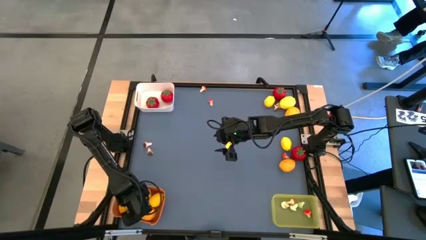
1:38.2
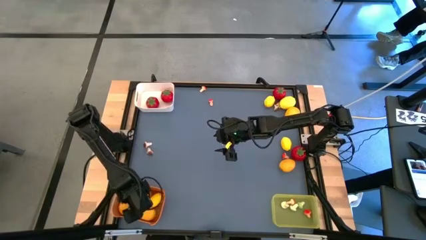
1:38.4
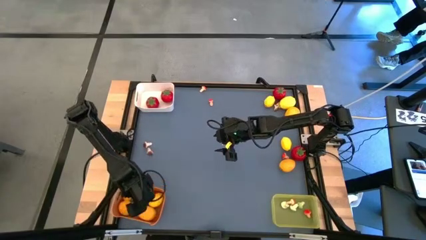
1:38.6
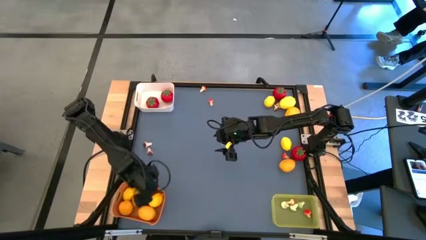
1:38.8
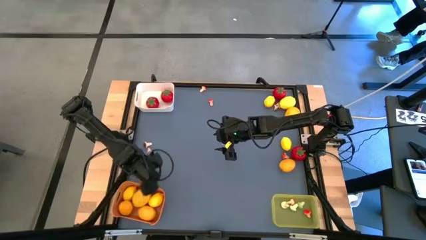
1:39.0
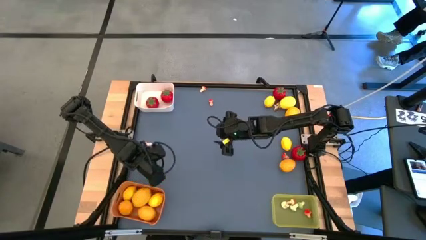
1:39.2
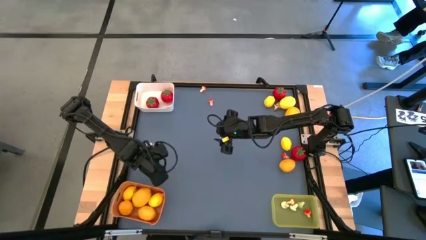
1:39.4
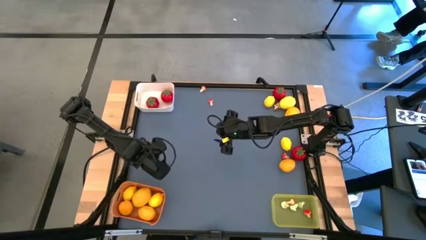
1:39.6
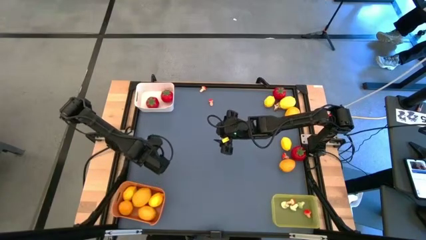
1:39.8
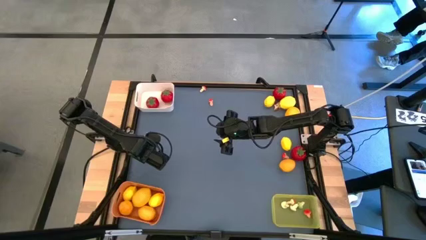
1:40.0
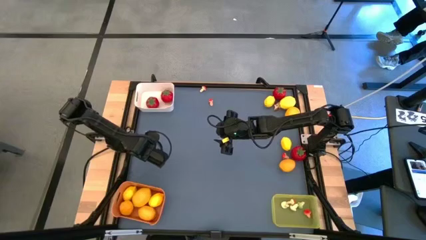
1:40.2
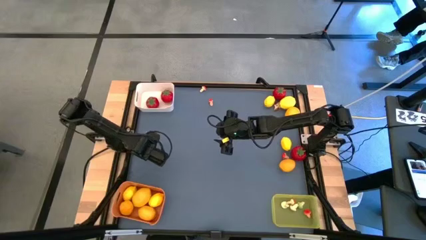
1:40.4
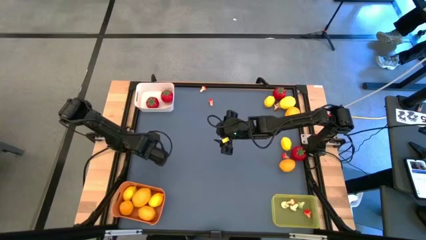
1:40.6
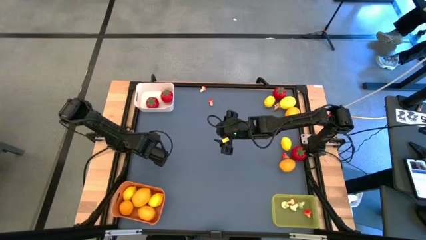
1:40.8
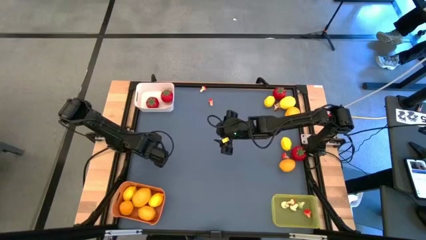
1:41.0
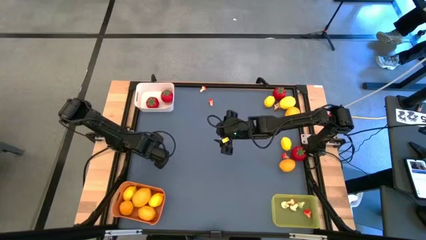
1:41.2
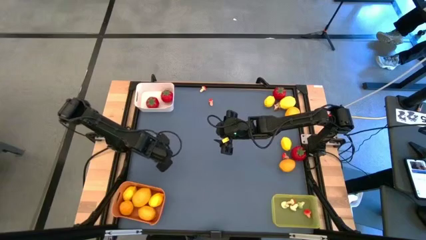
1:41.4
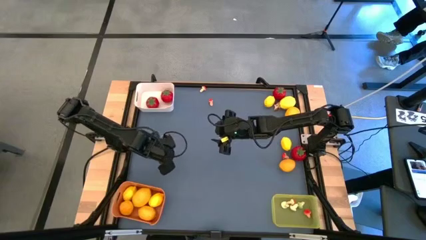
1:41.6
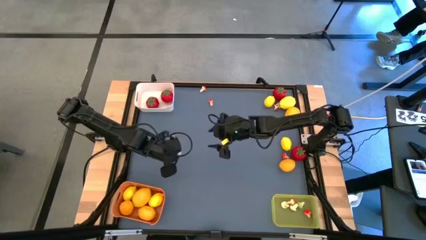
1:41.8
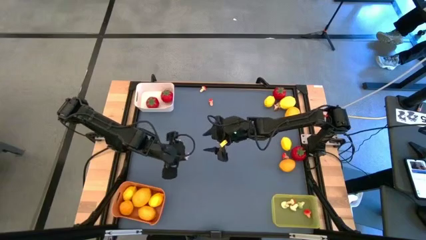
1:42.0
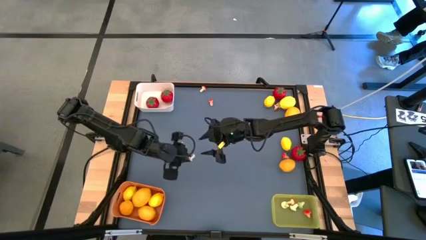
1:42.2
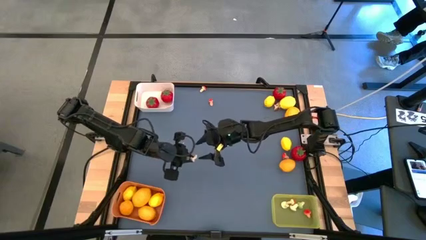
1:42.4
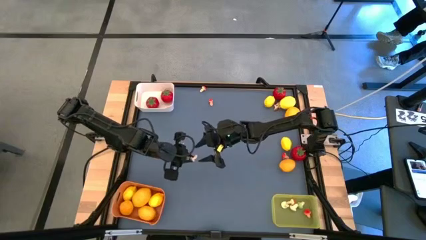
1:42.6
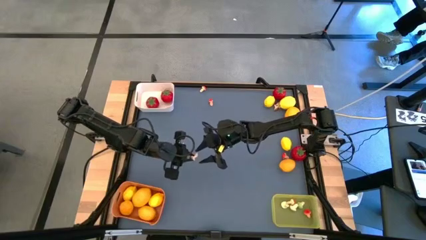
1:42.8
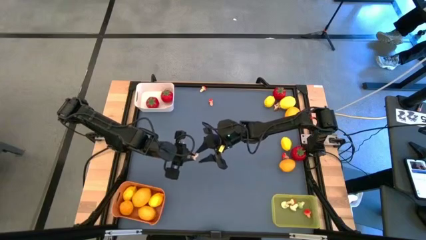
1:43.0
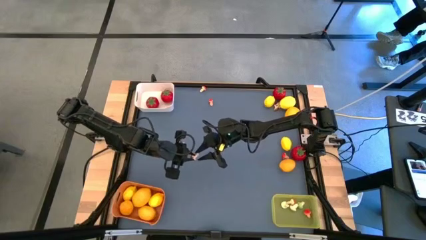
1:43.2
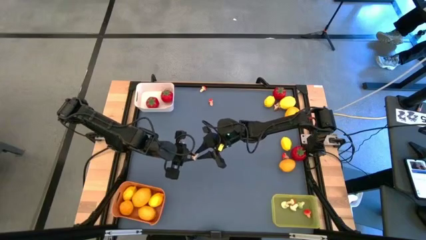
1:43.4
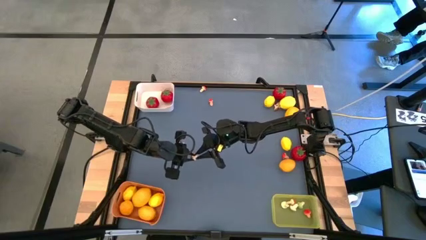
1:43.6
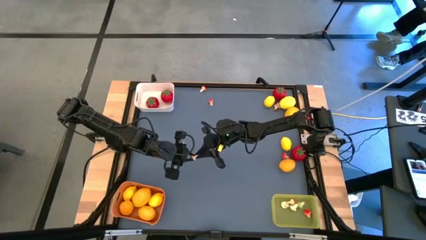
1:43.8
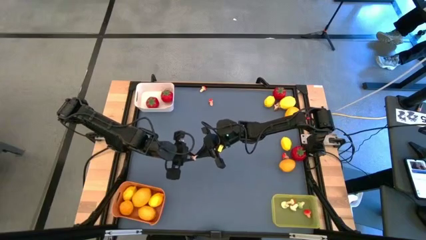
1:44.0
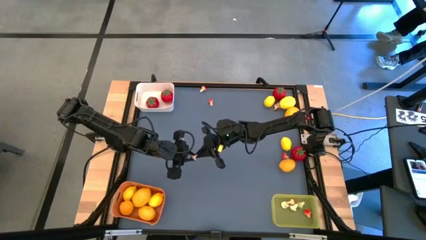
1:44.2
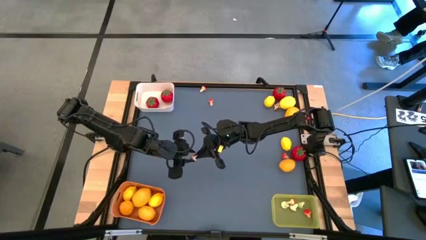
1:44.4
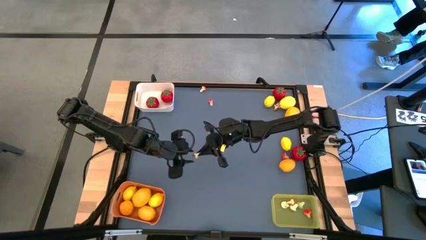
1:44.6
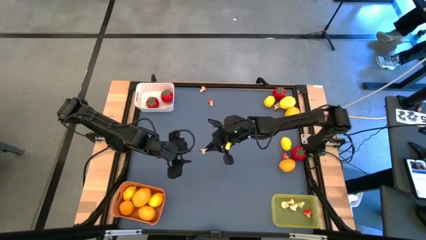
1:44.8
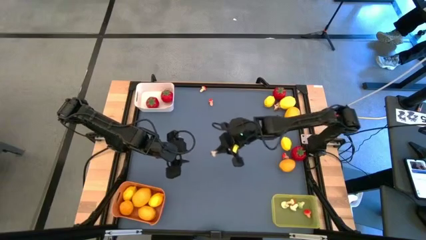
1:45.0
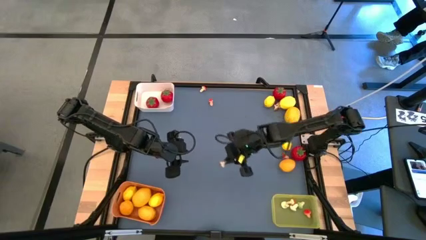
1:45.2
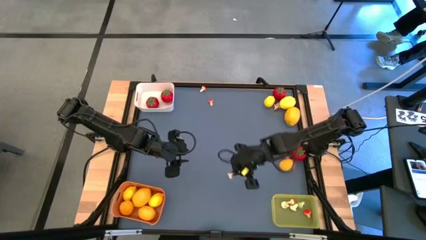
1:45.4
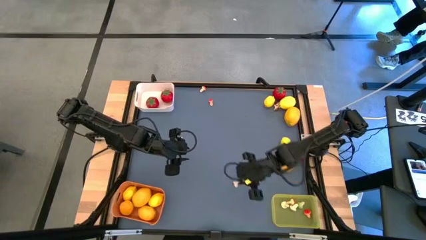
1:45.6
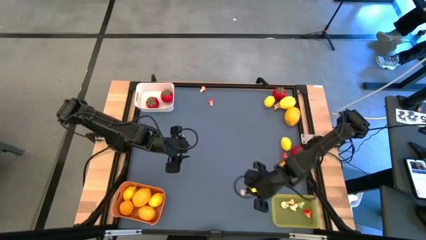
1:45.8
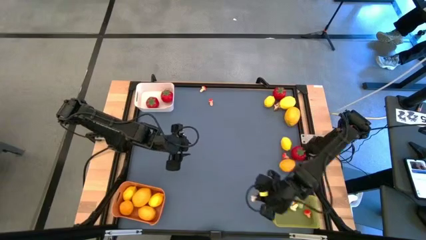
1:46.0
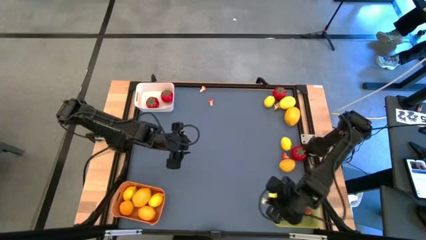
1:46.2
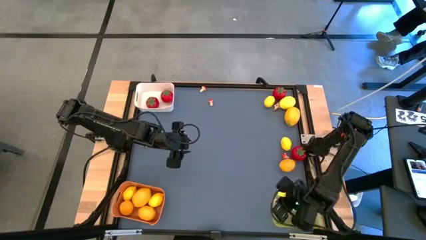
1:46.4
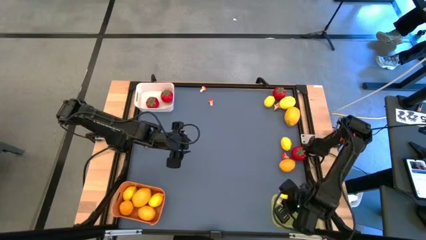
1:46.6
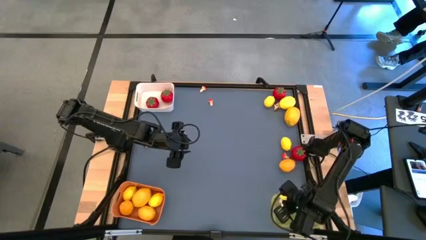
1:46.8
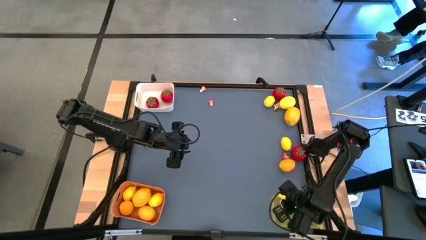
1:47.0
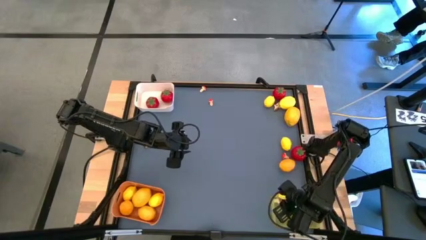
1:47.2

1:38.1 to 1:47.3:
Task: Sort produce into baskets
Put the brown mushroom into the yellow bin

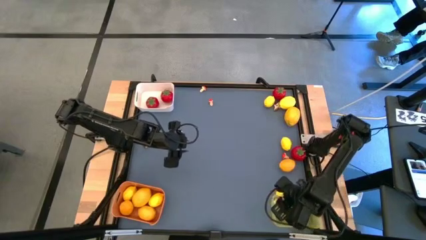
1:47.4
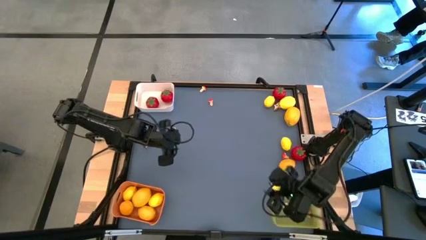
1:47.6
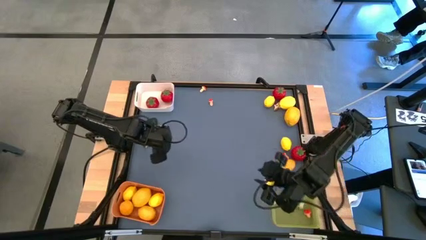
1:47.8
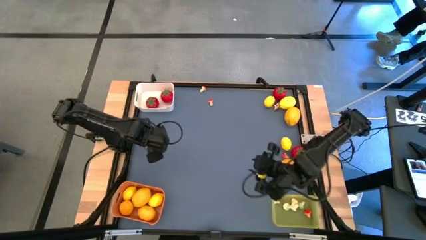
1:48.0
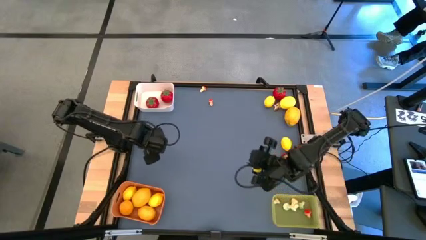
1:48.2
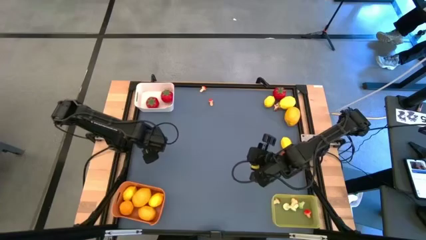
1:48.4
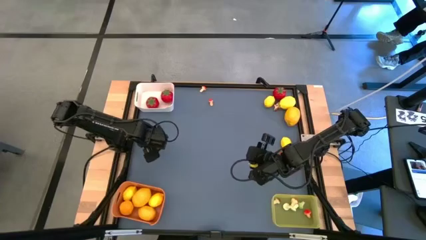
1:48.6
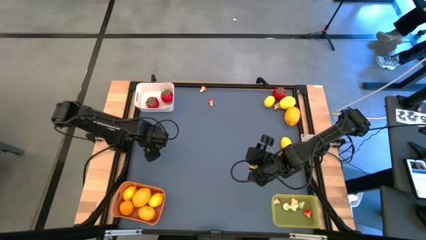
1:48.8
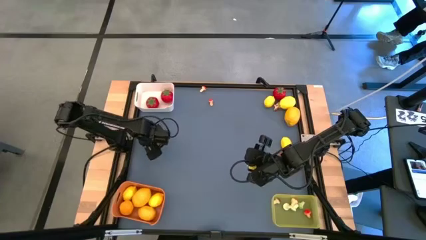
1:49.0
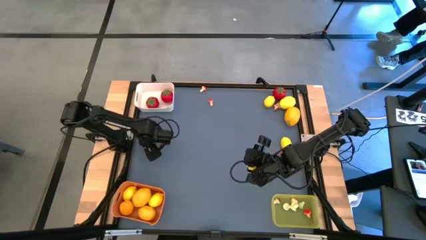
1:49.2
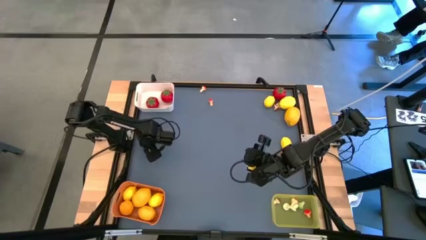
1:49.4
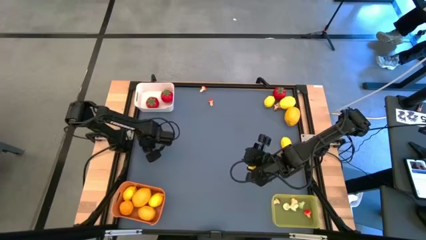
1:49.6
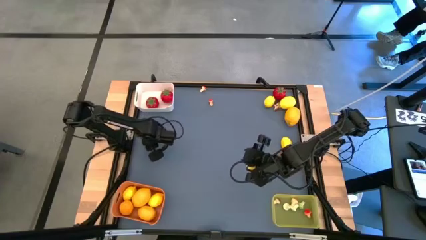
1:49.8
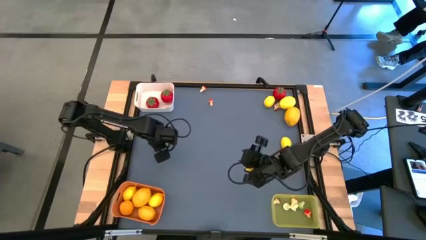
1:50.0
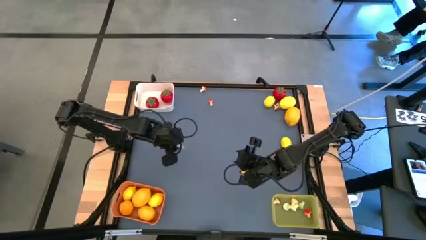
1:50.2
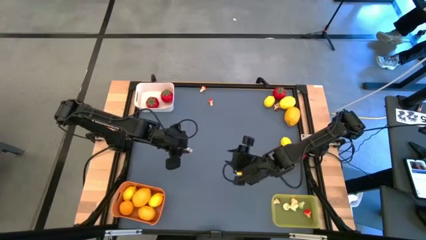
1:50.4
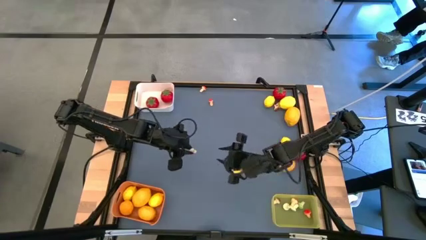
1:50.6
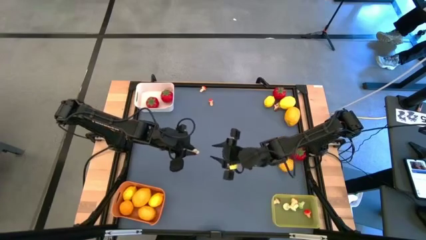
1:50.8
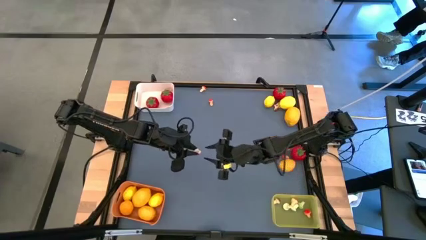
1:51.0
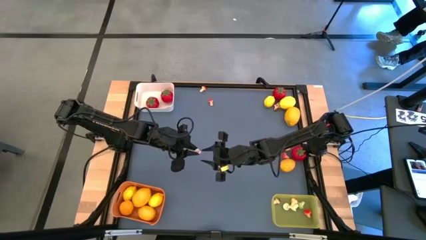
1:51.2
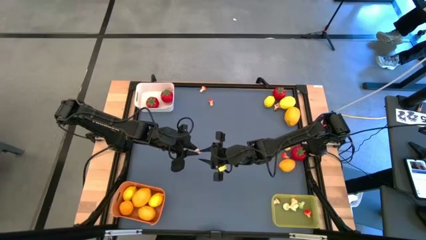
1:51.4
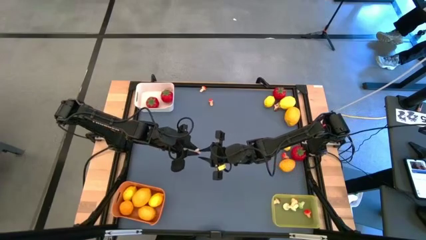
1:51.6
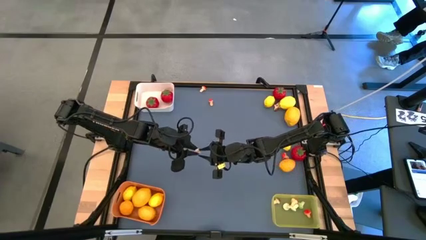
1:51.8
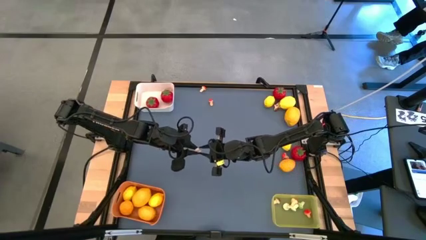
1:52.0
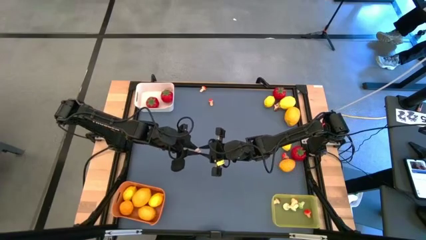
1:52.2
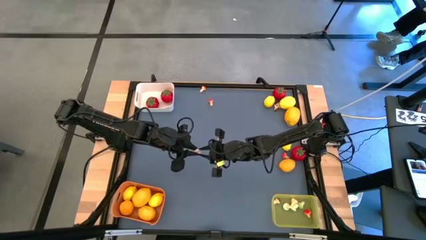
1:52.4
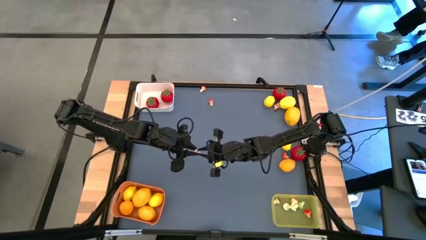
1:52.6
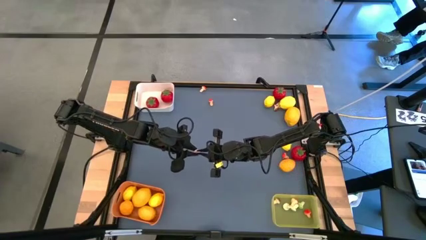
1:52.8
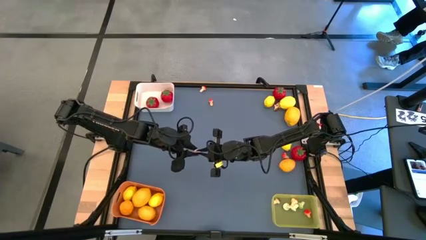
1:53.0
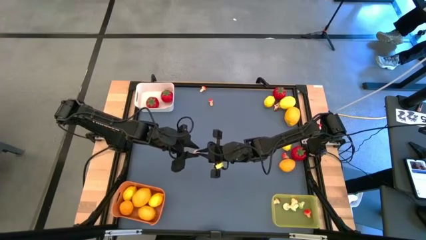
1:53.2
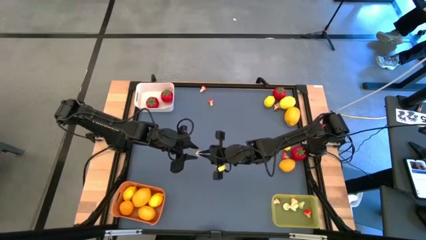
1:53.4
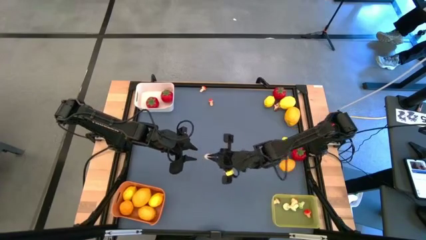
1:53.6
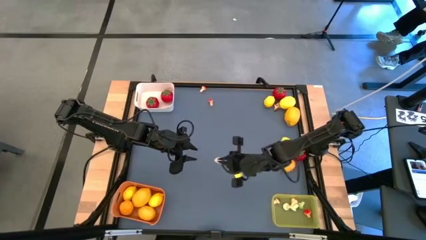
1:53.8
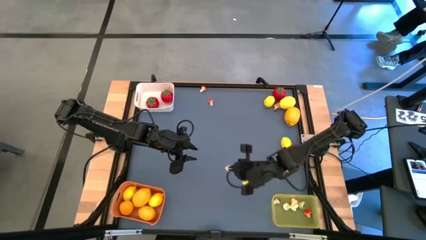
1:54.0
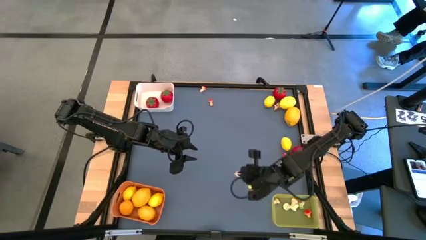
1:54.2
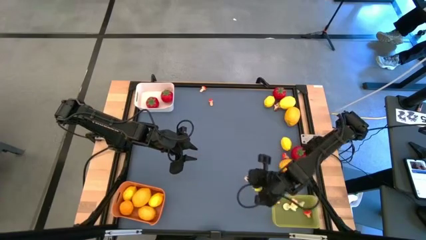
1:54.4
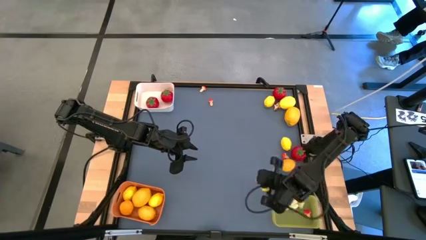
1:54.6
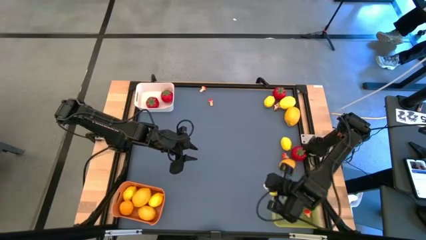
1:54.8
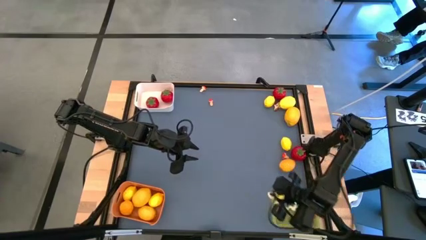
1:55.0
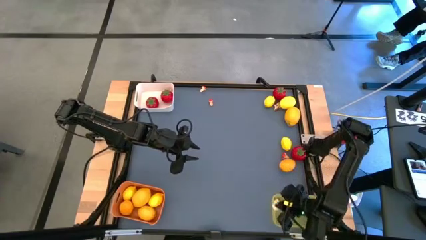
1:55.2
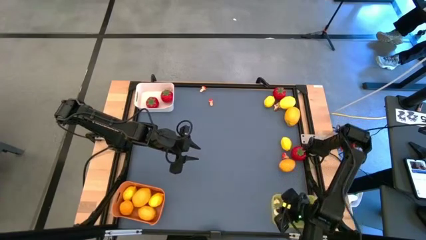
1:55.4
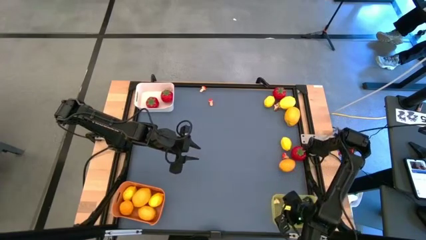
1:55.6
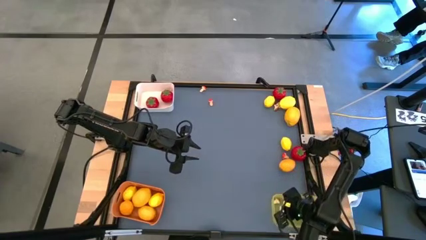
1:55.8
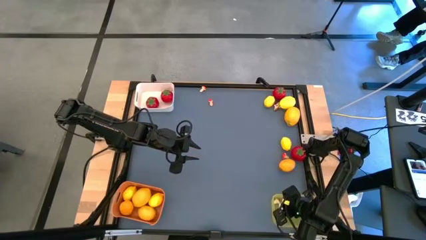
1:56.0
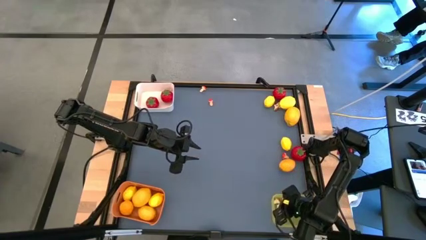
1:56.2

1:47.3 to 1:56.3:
Put the brown mushroom into the yellow bin
